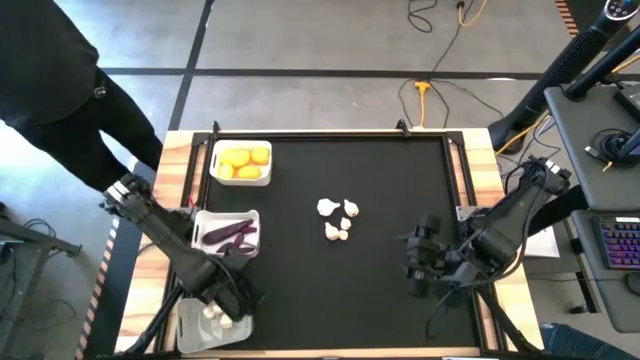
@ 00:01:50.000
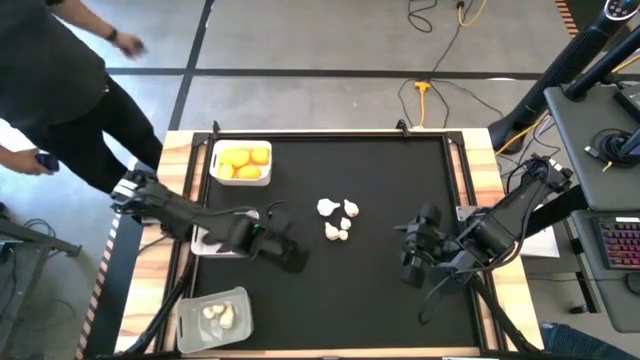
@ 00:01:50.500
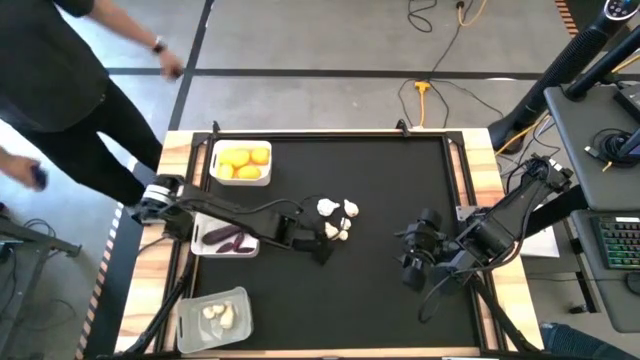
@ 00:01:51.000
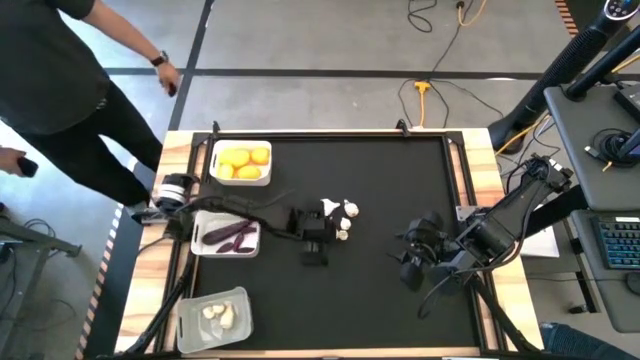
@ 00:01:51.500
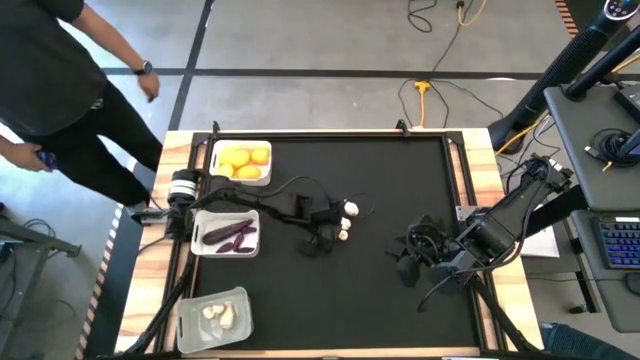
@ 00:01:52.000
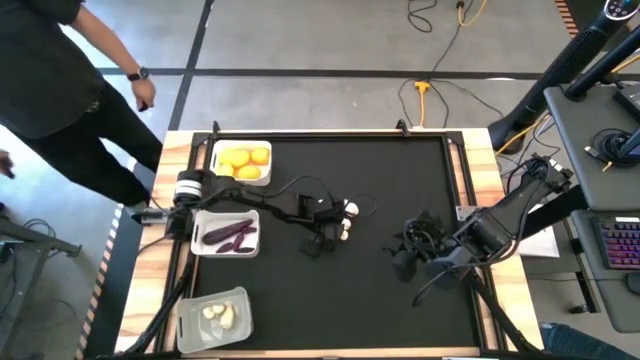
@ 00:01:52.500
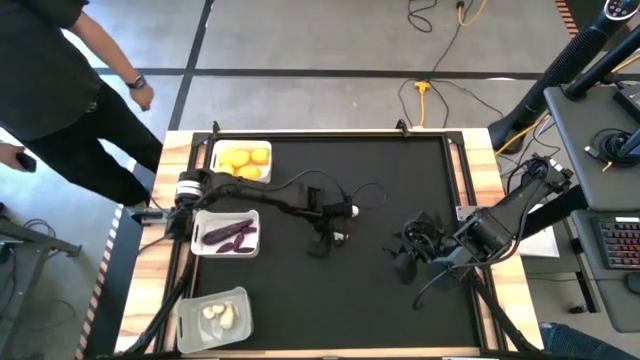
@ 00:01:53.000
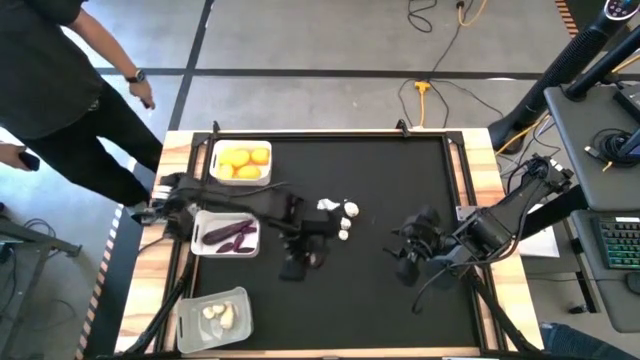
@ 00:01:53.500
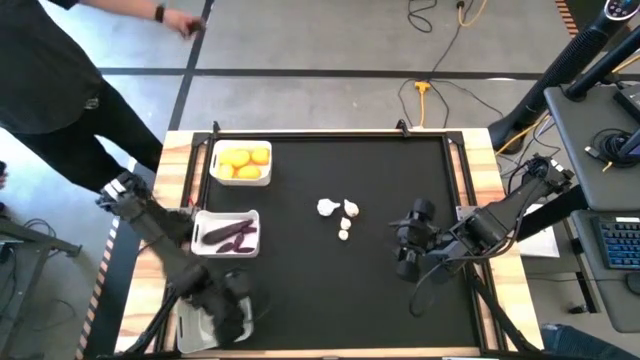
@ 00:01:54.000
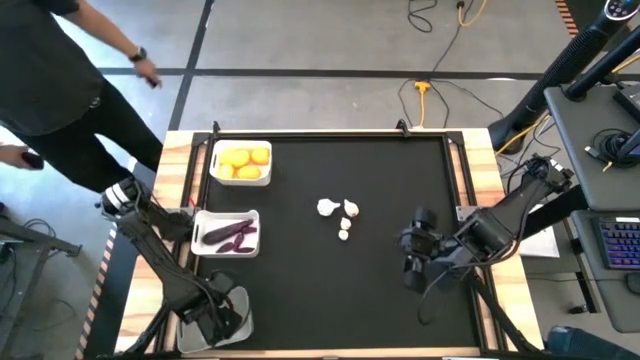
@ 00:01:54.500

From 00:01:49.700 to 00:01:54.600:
Task: Sort produce into baskets
Put the garlic into the gray bin

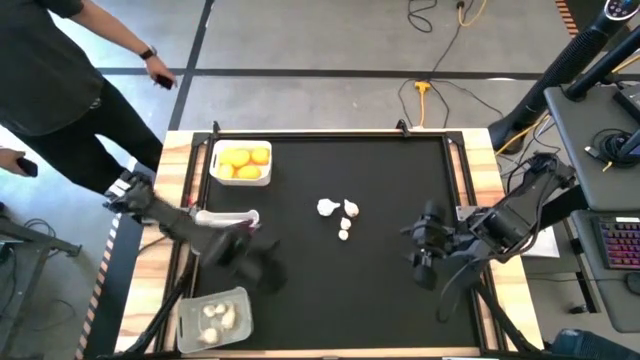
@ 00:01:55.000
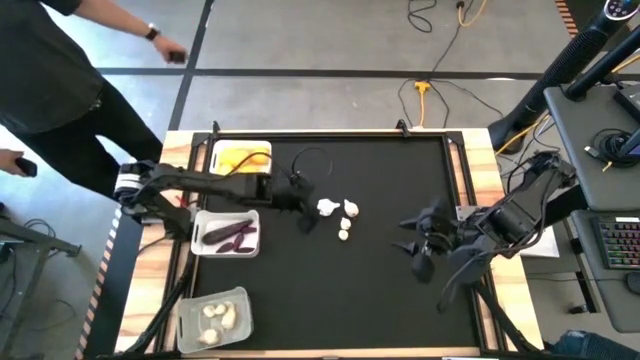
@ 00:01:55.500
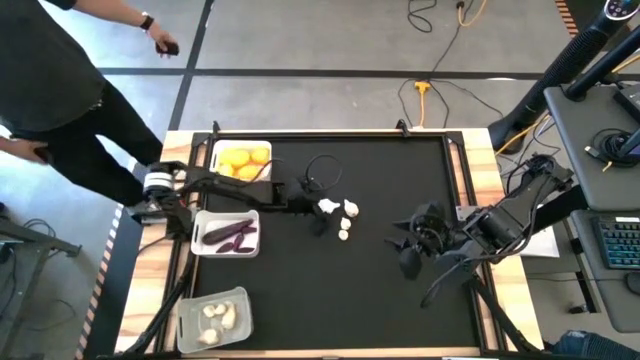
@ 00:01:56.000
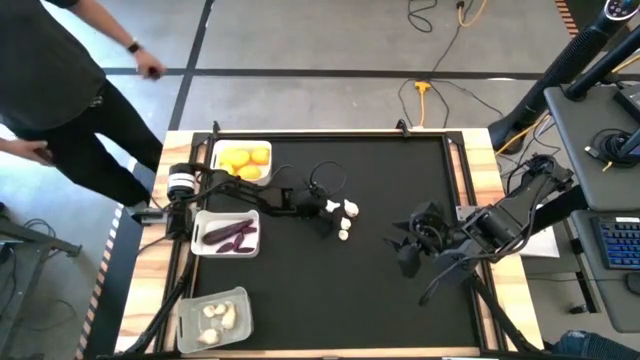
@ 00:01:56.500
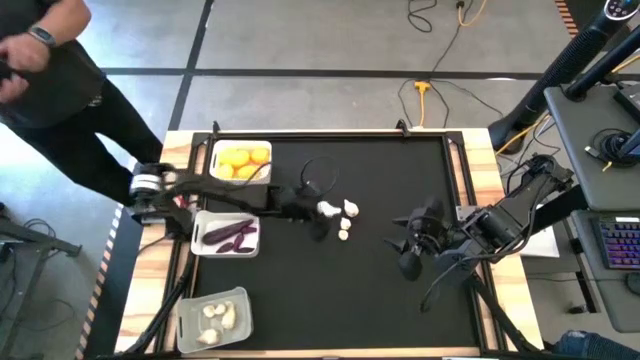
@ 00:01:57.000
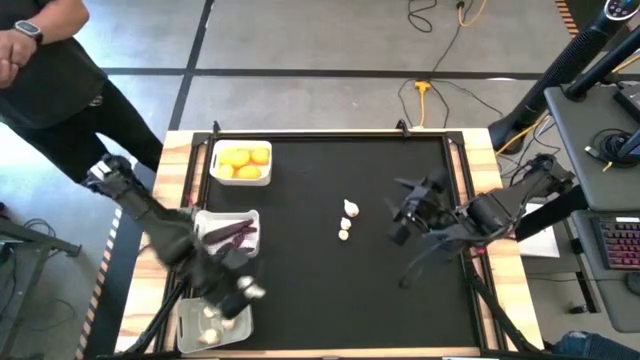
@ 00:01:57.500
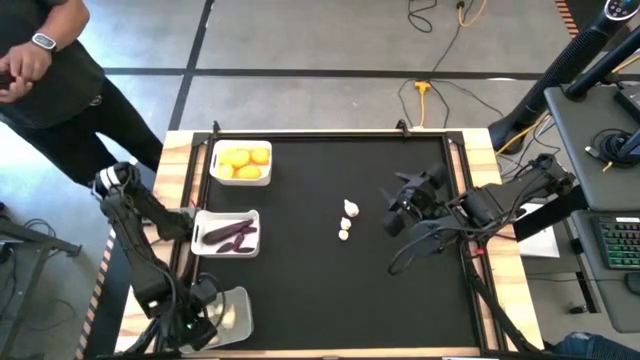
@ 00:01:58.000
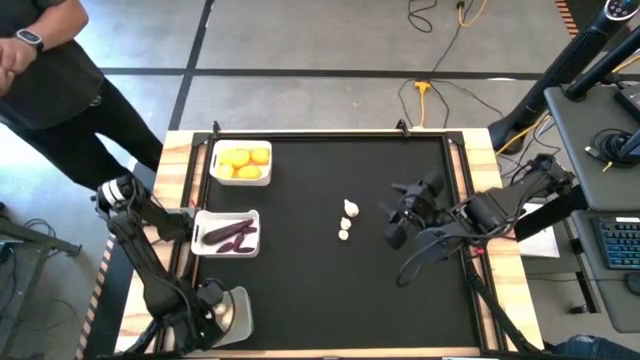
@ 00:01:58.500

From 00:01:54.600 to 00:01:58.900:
Put the garlic into the gray bin

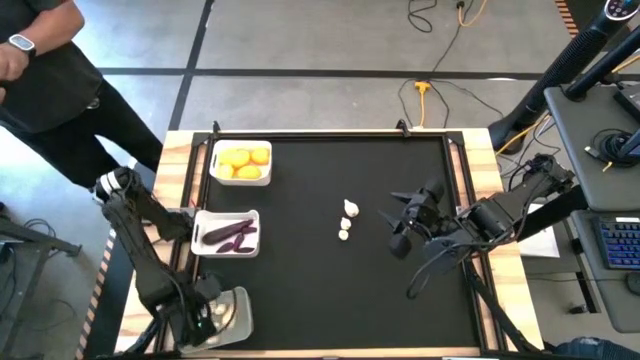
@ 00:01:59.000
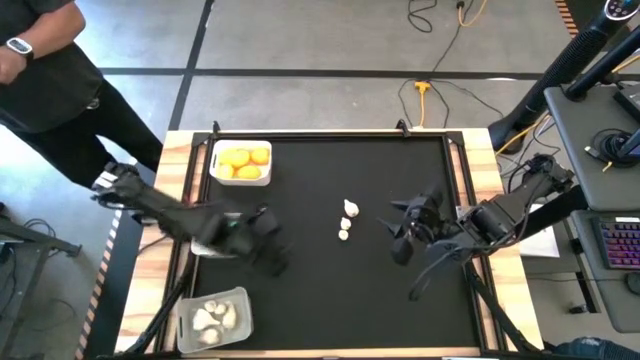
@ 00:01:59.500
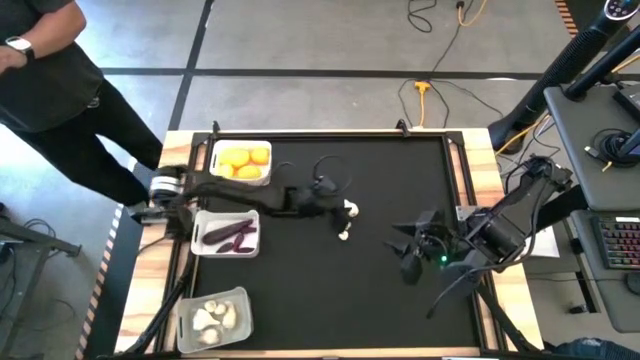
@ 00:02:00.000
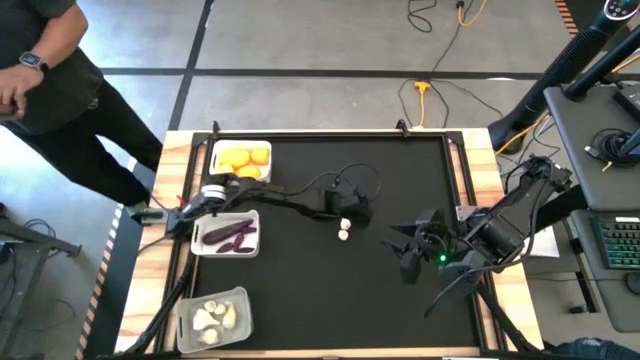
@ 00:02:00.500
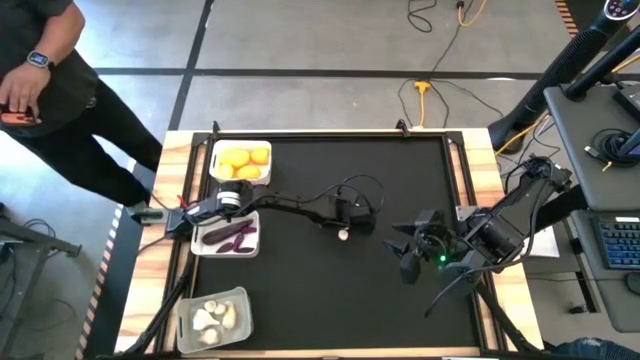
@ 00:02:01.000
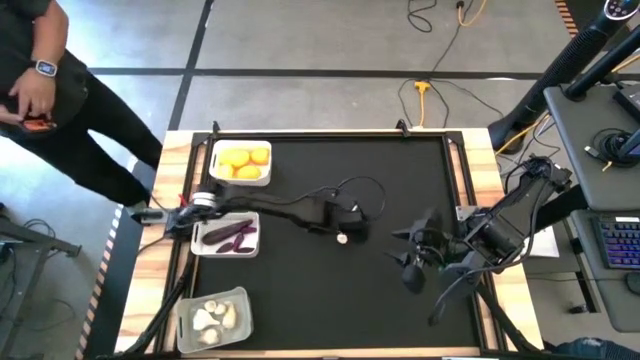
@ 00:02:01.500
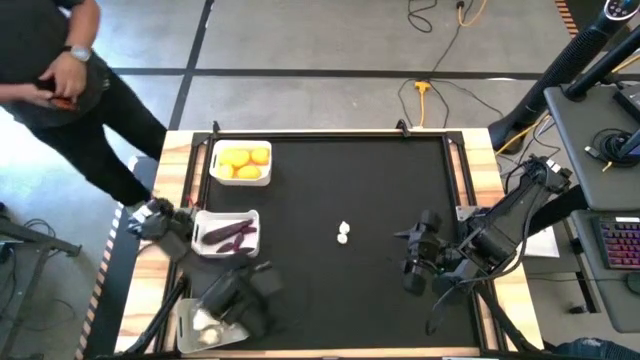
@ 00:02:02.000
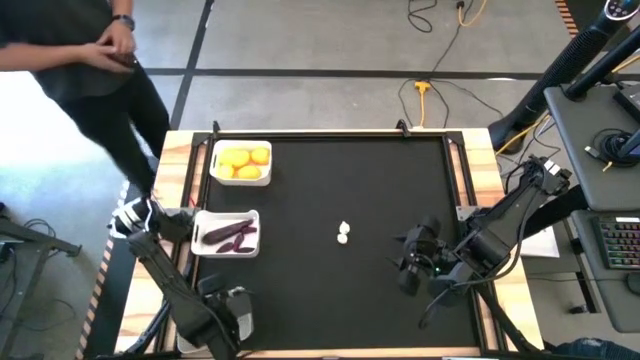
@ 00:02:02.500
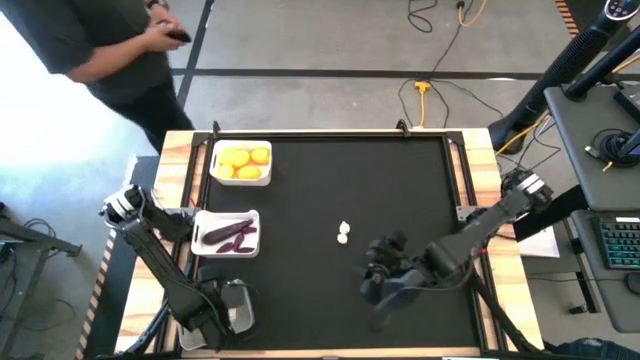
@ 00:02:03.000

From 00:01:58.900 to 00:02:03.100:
Put the garlic into the gray bin

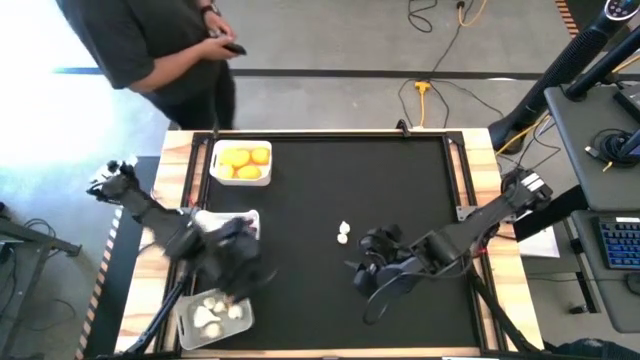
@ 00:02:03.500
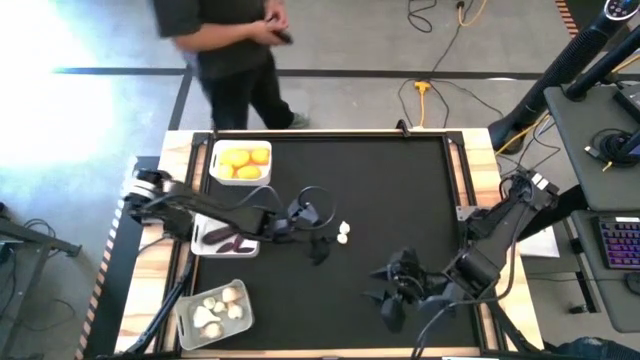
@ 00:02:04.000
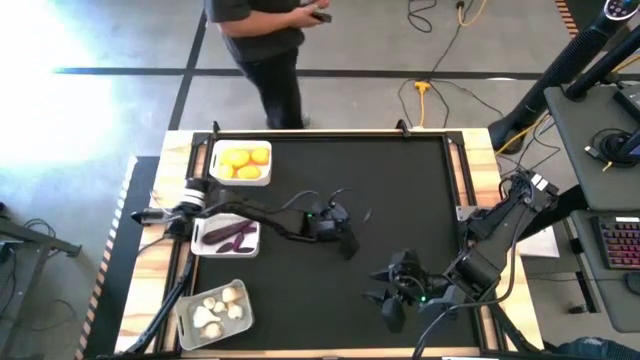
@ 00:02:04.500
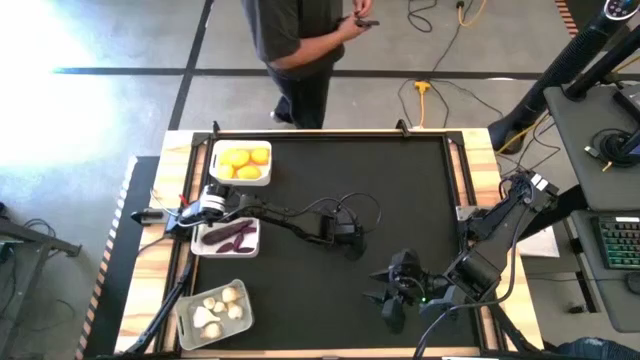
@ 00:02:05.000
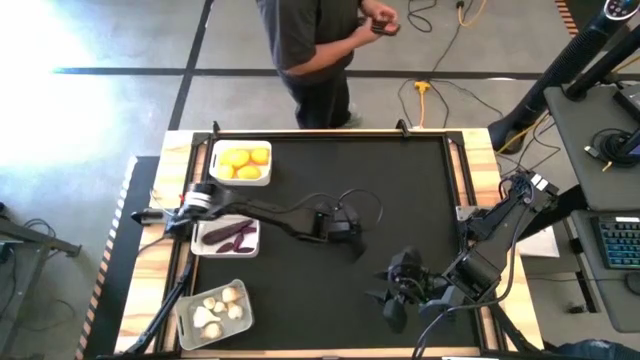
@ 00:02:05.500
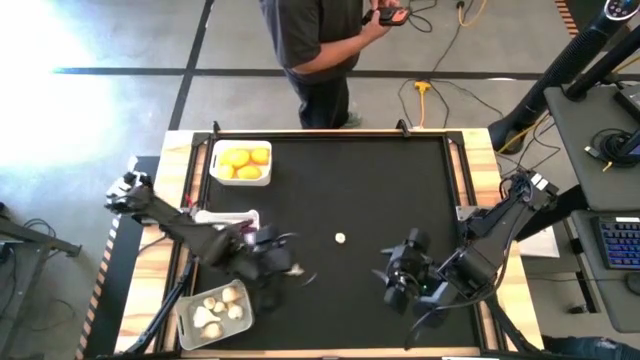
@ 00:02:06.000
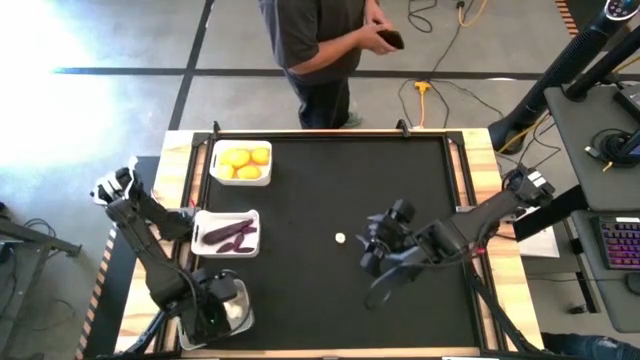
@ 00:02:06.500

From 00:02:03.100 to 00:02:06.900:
Put the garlic into the gray bin

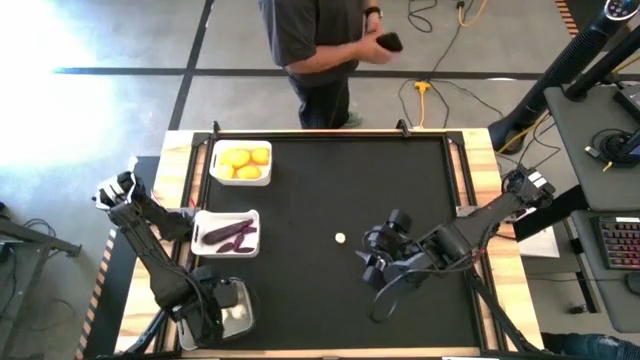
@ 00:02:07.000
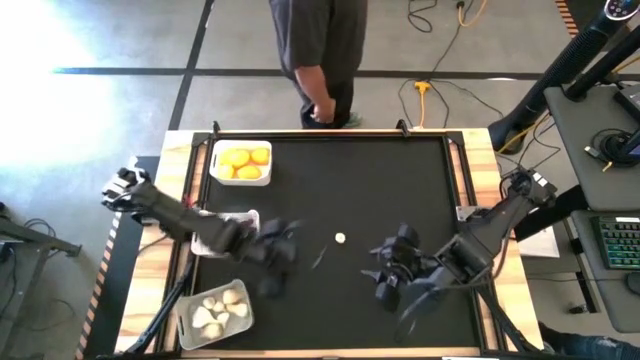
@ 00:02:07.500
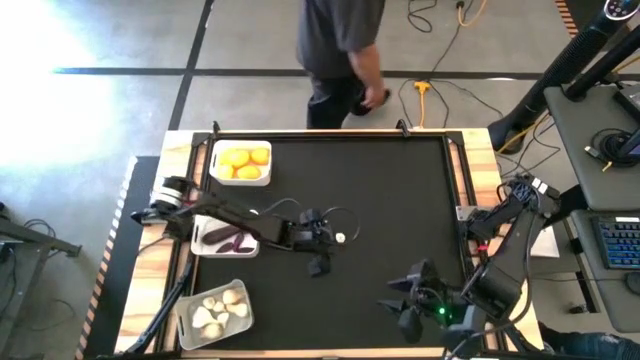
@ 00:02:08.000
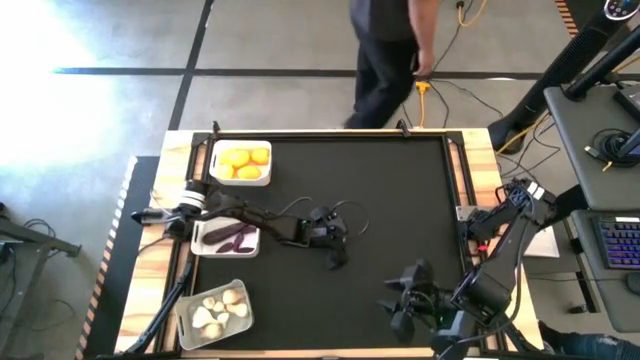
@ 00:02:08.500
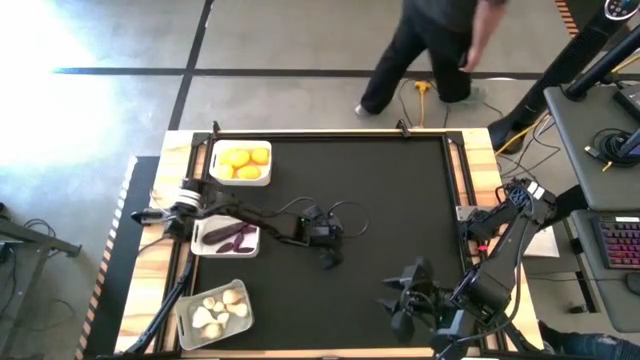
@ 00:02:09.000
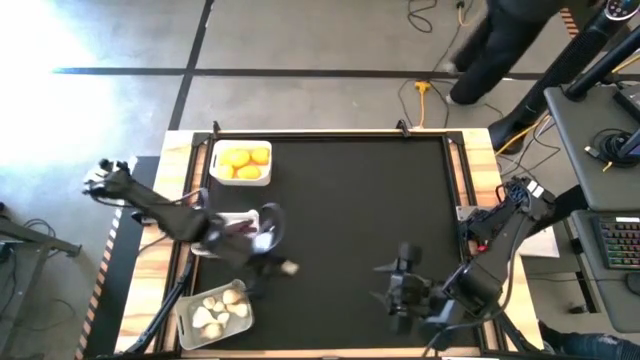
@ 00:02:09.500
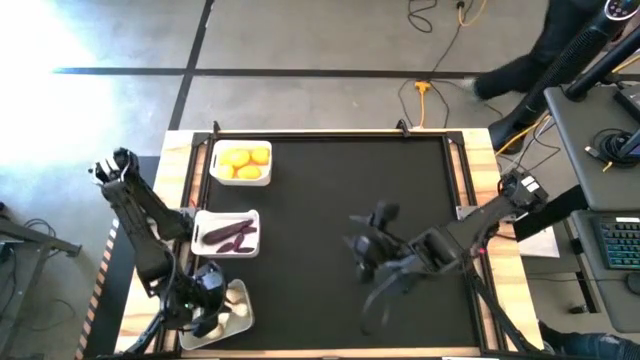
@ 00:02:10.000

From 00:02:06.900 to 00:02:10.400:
Put the garlic into the gray bin
